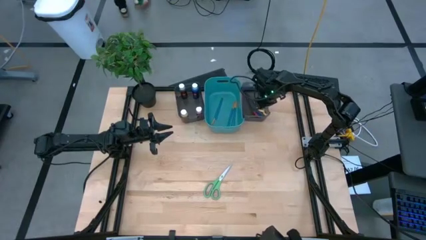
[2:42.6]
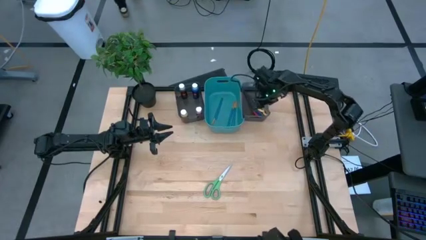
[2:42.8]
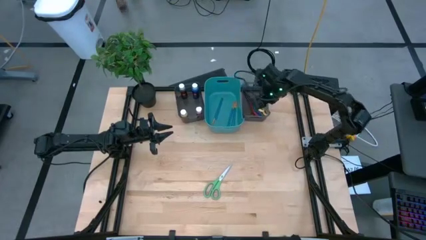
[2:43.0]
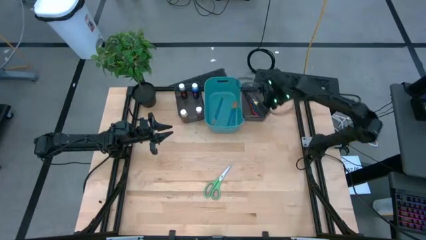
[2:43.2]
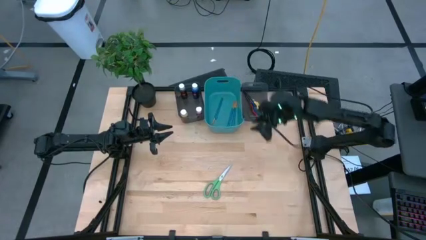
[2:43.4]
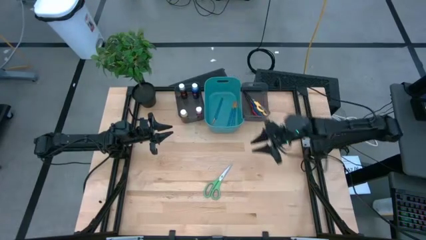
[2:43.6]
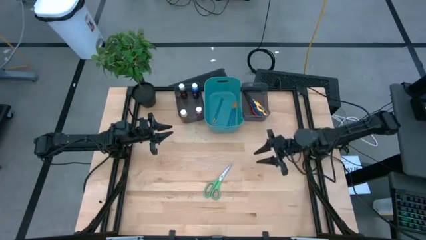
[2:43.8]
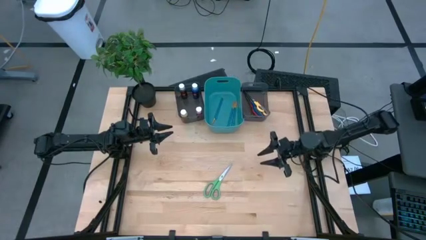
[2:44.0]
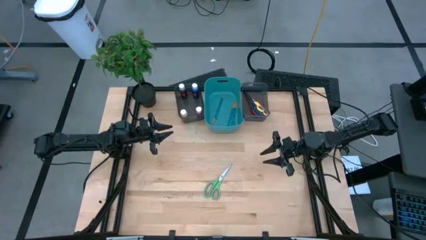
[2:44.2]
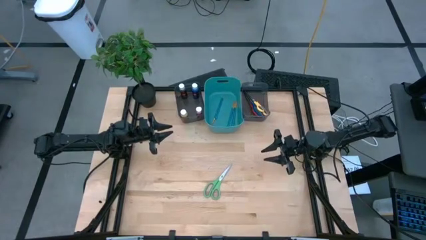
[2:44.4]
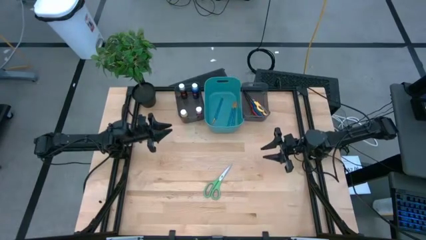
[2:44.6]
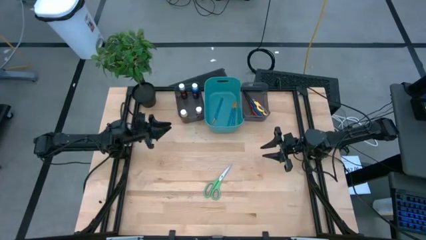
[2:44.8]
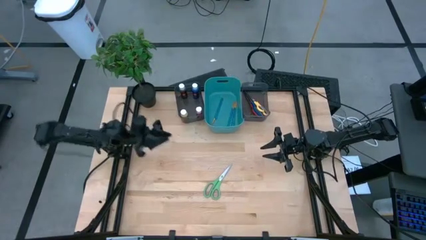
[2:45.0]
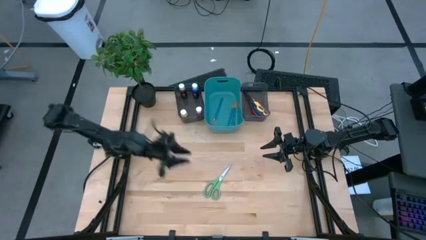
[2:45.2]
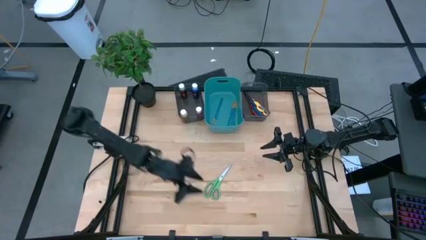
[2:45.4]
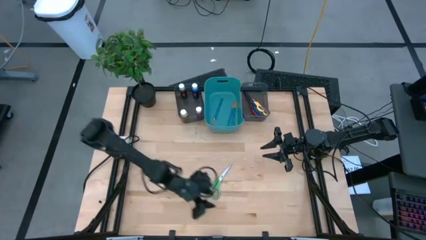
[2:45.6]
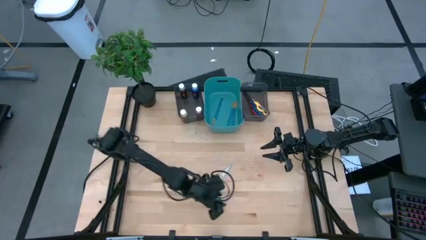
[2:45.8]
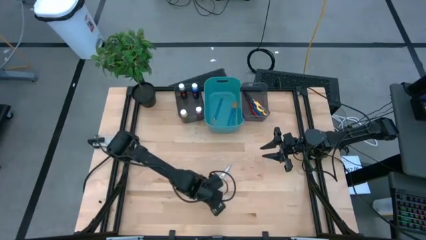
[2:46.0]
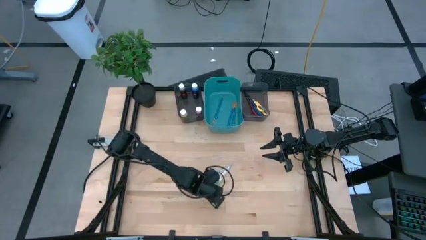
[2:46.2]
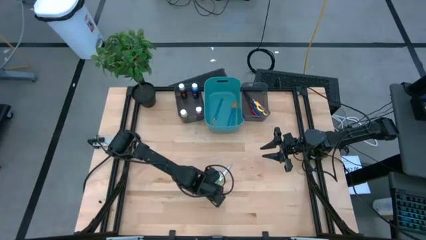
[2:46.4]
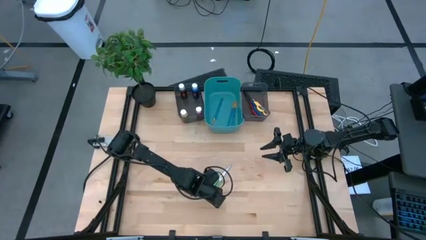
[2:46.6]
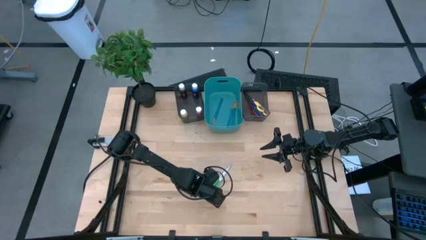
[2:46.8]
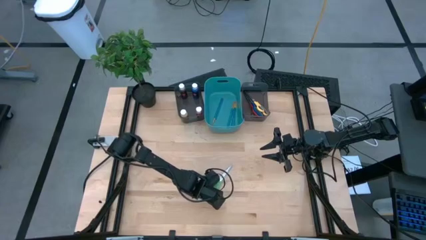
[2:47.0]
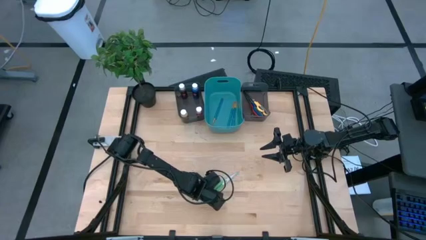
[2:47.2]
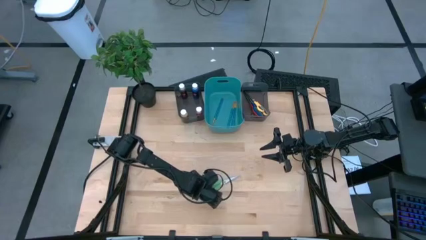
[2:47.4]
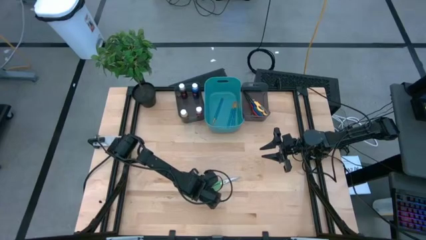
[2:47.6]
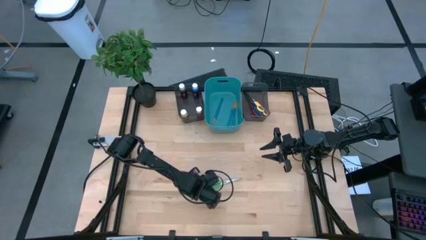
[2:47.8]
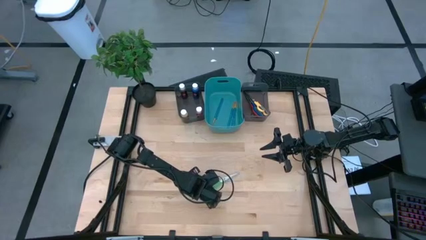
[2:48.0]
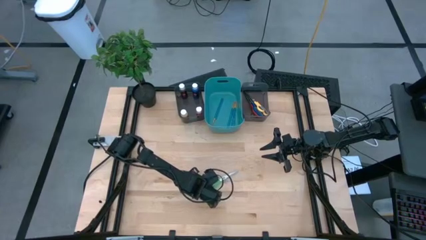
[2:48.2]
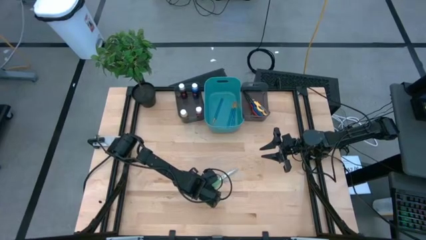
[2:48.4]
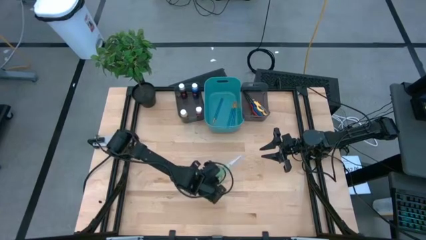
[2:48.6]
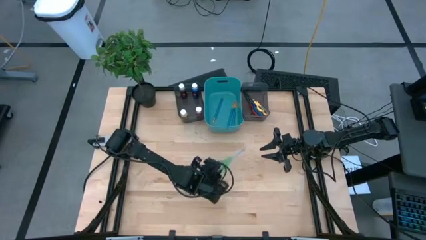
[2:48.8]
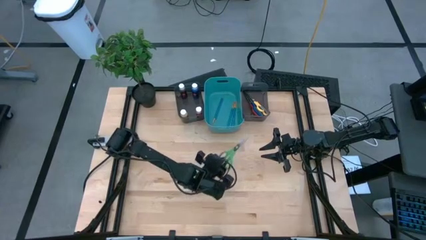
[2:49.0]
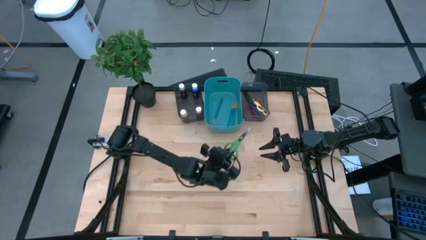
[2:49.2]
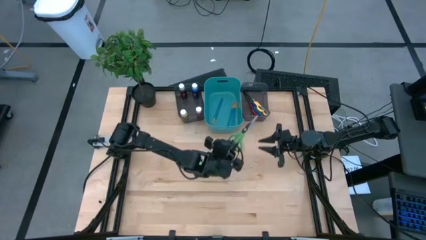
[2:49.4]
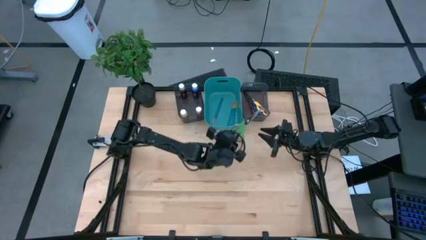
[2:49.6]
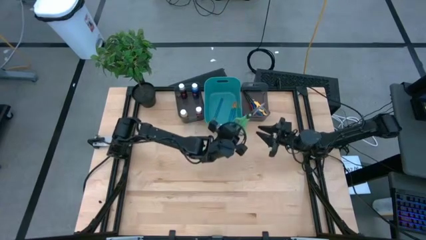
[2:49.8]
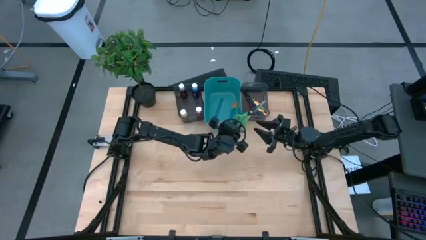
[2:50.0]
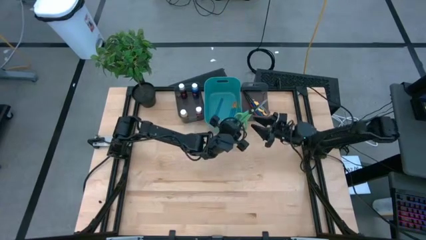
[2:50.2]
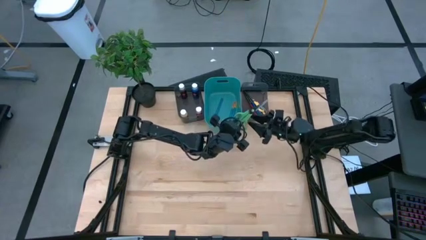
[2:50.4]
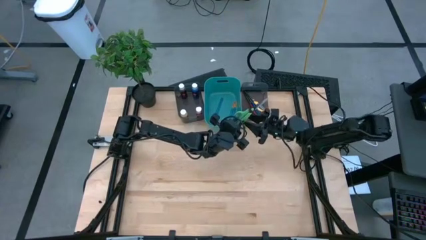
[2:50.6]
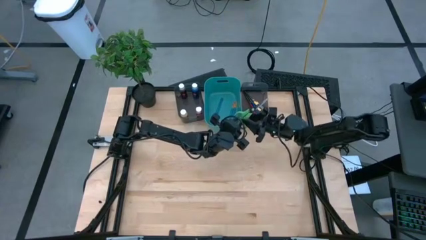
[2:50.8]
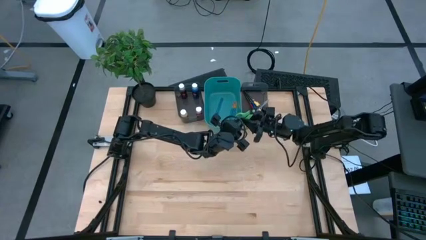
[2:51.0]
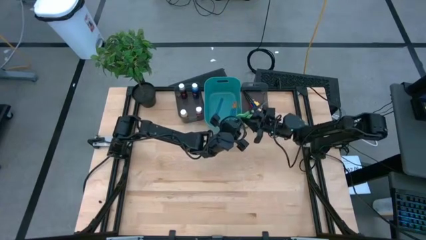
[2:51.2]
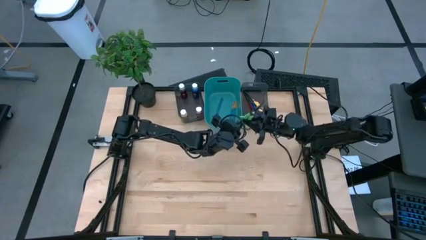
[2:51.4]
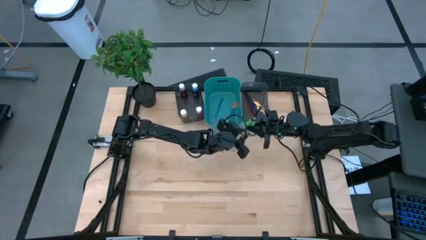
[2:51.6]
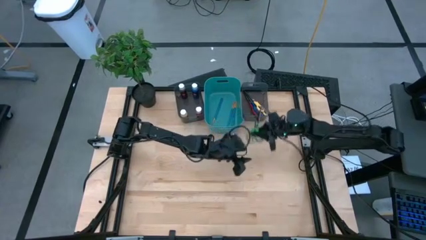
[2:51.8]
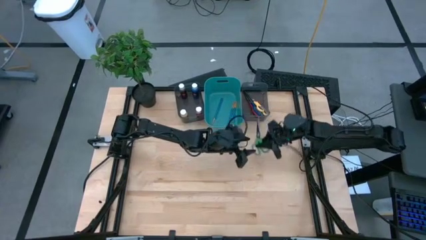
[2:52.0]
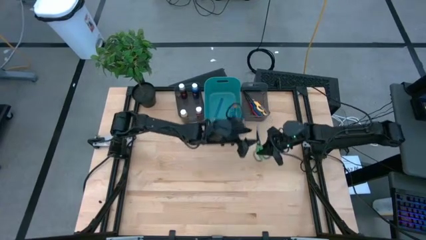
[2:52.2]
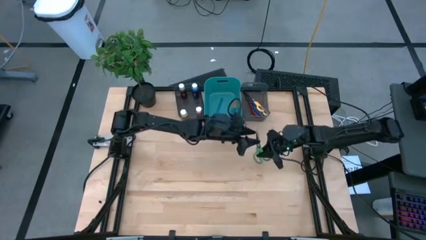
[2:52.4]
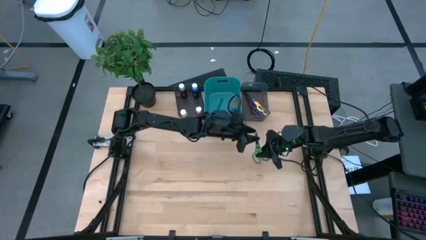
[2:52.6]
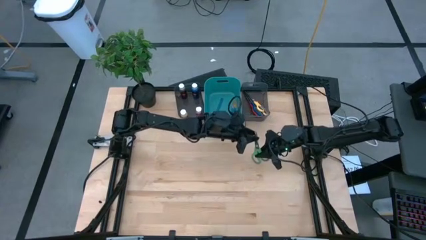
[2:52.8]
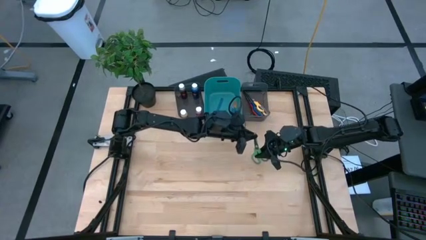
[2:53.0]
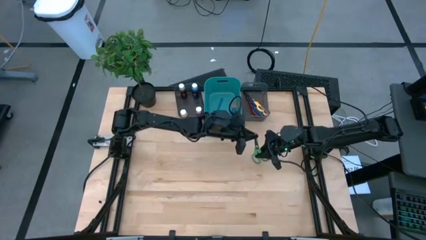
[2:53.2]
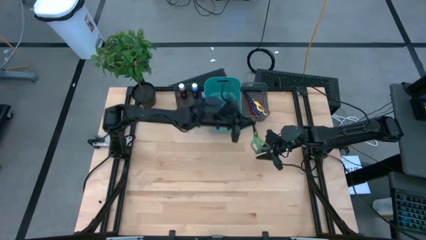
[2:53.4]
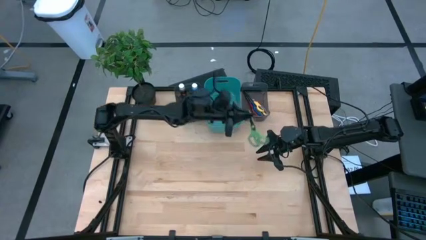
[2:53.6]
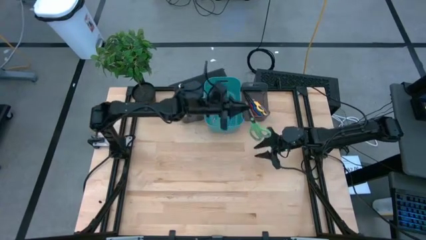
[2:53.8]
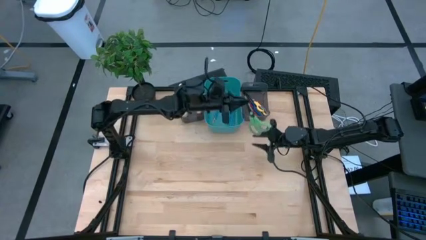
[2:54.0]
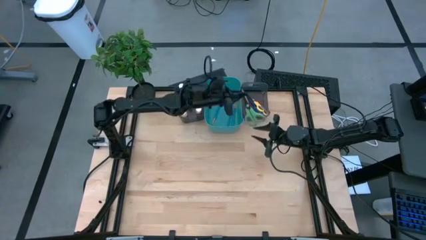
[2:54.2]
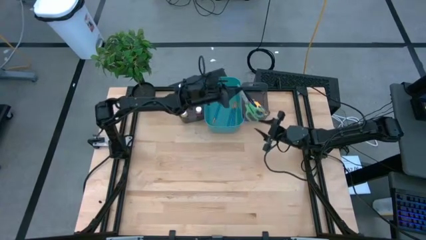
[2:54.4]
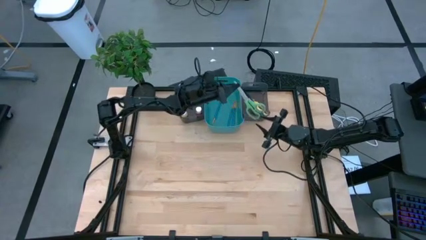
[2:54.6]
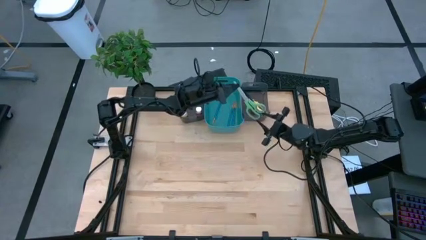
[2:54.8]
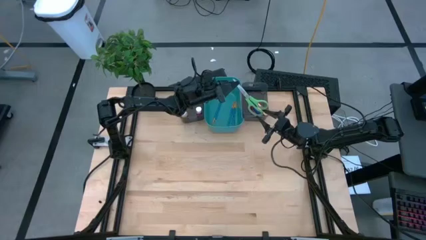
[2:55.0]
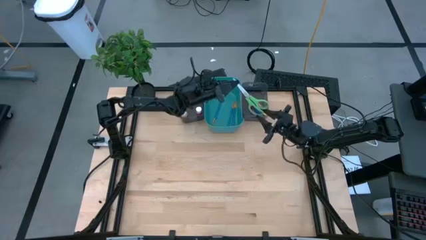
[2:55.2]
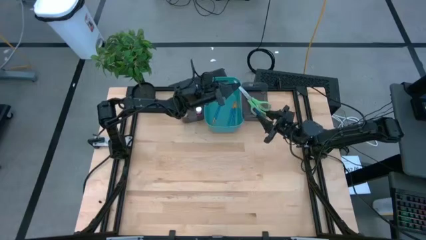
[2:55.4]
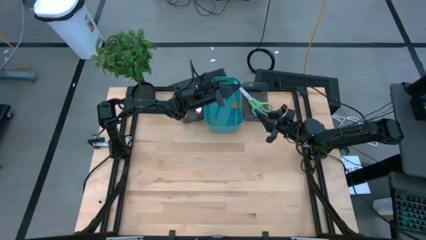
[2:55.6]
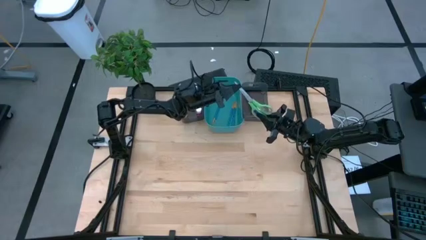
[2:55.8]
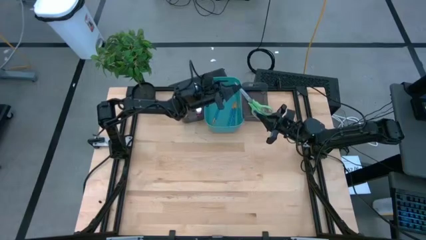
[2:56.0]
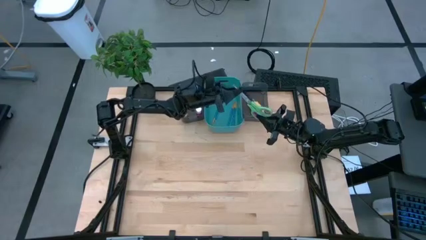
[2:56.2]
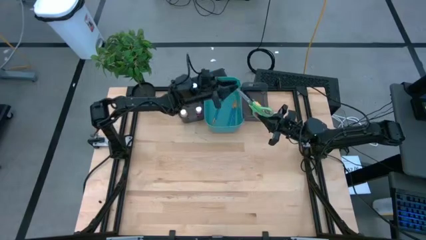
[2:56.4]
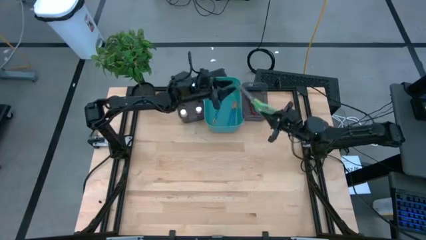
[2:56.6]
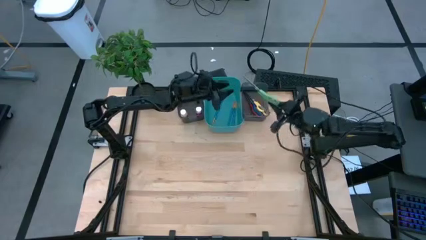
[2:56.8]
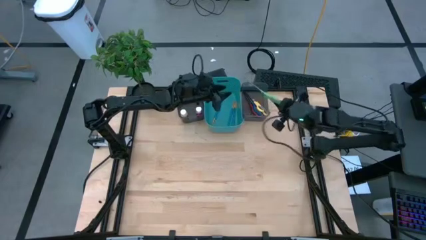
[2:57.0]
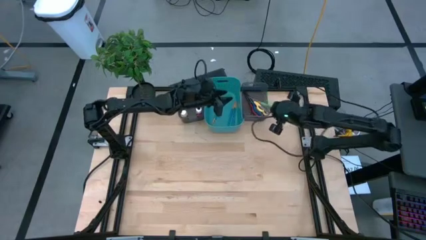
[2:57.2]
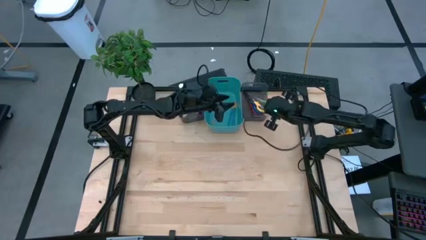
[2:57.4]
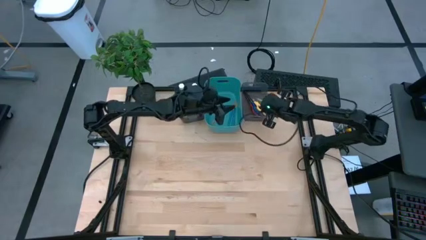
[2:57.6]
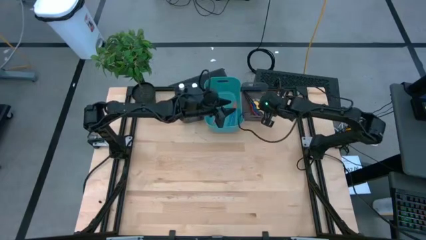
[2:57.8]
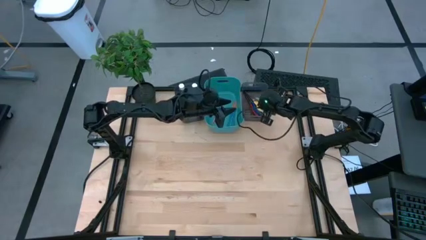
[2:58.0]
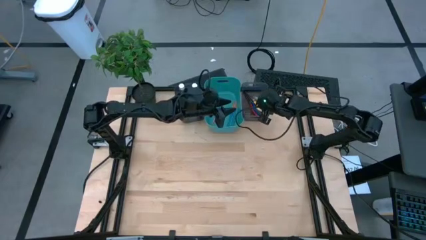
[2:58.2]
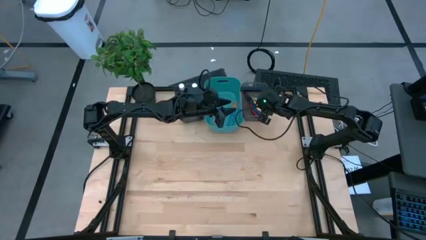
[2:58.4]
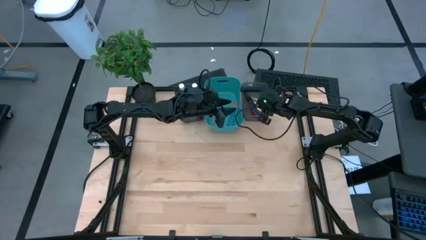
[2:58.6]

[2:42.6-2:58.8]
Task: Pick & Place Paint Supplies
Put the green scissor into the right black bin
